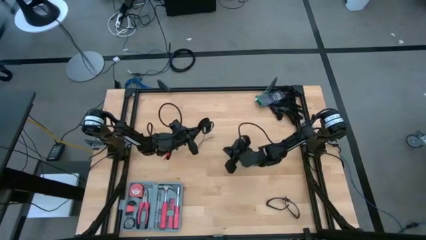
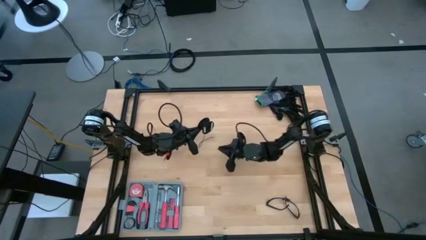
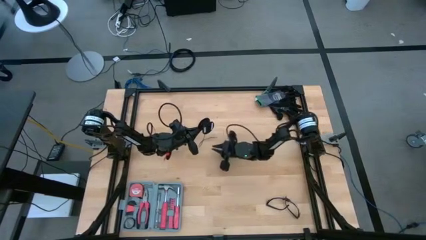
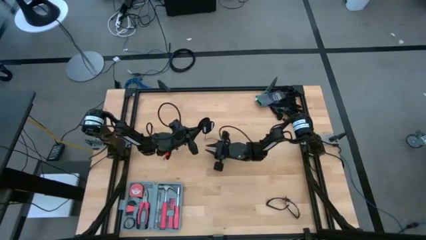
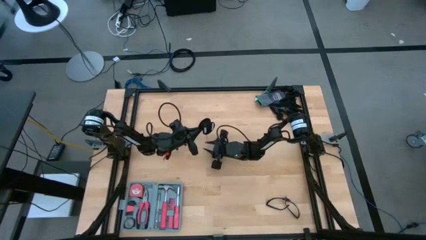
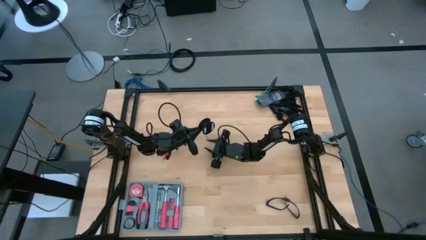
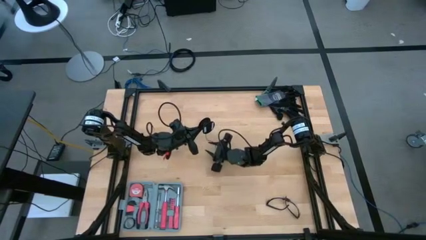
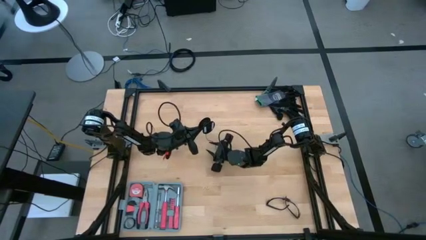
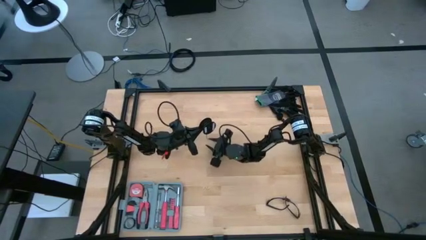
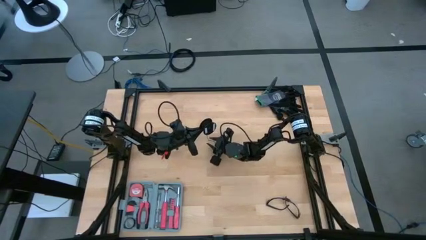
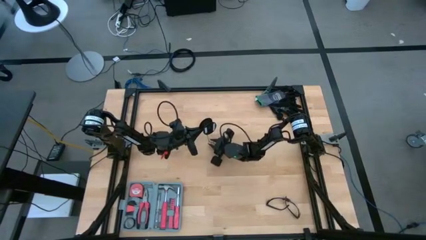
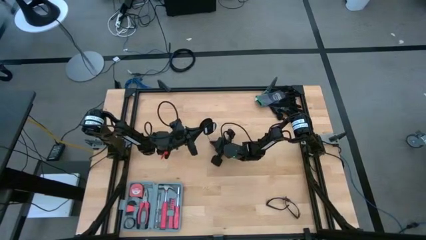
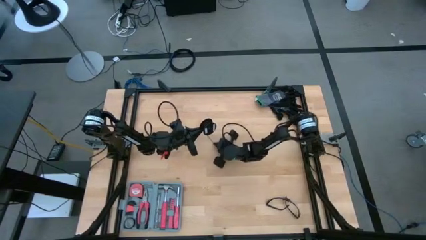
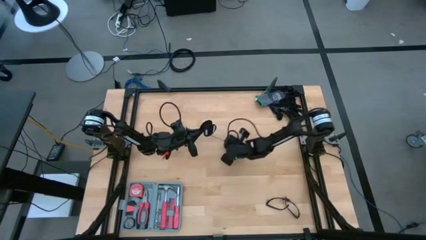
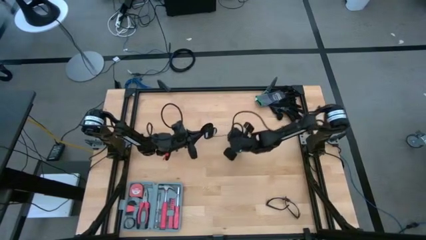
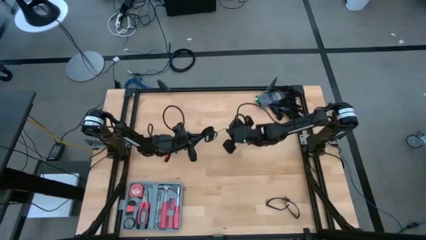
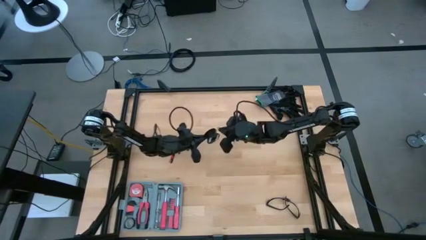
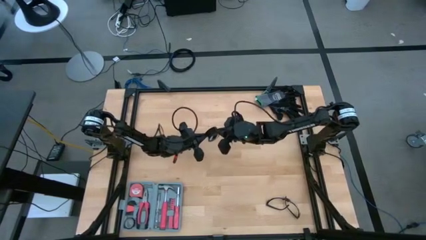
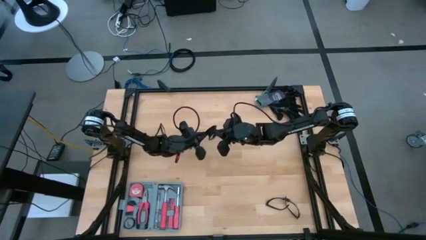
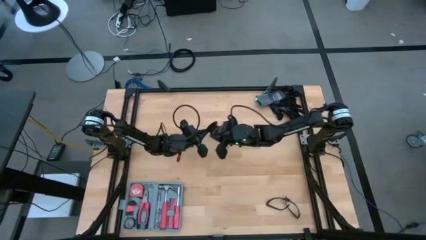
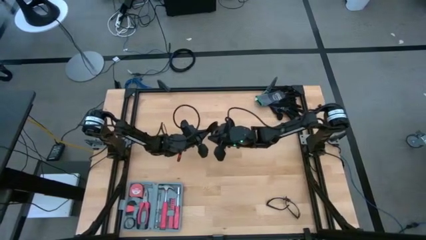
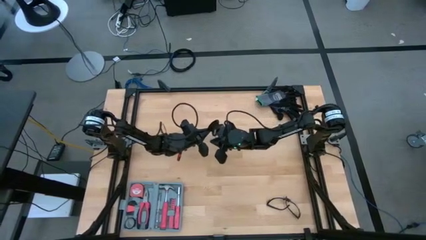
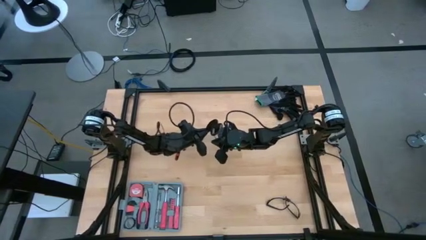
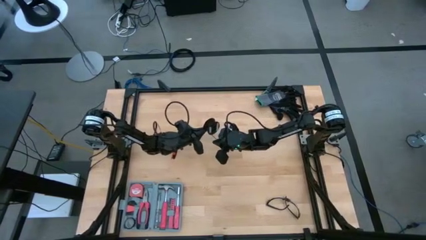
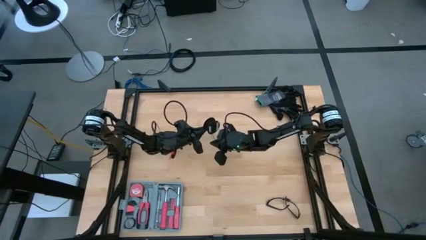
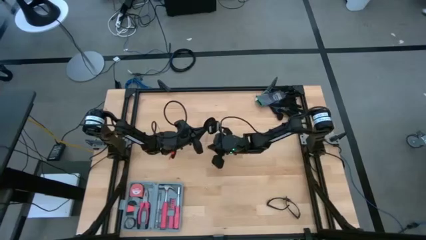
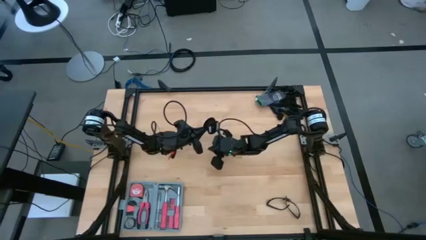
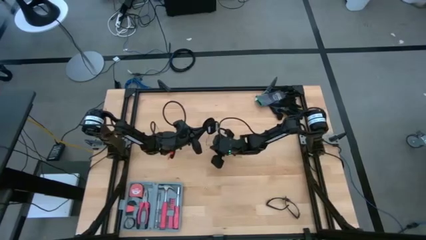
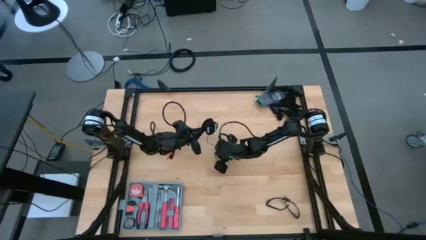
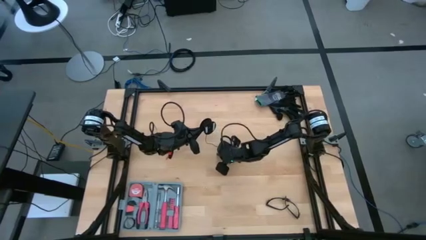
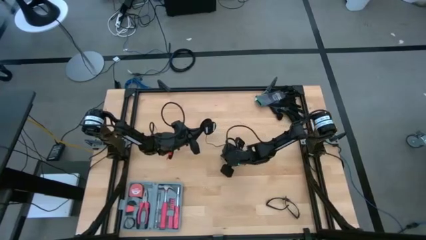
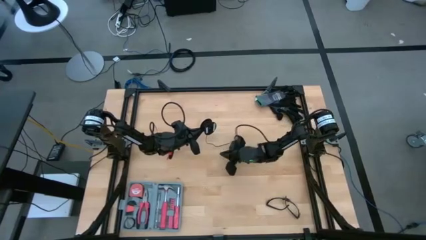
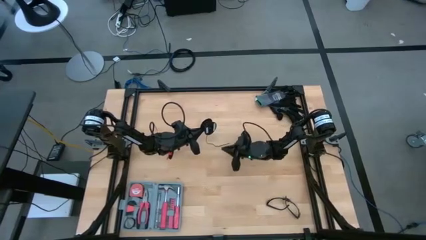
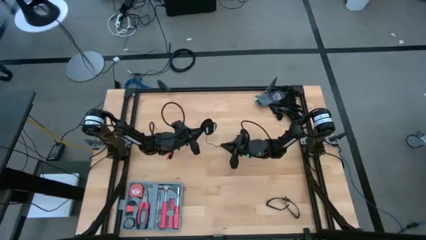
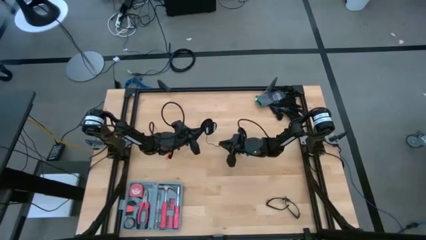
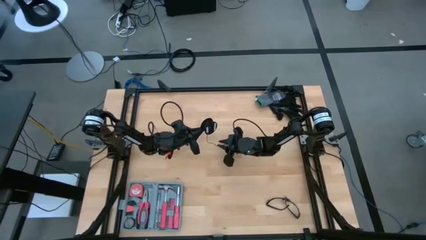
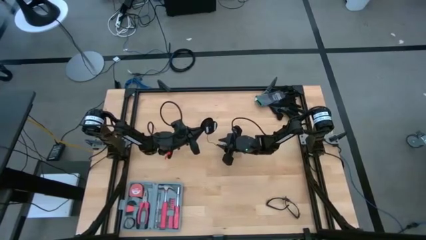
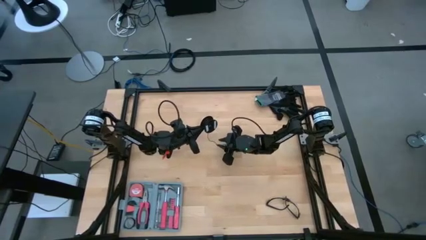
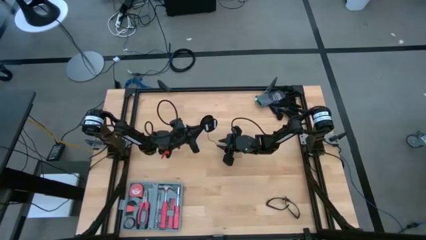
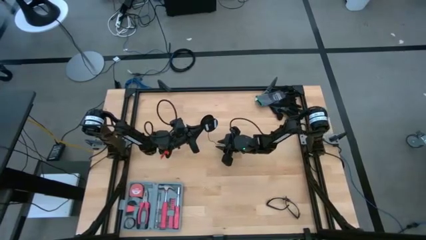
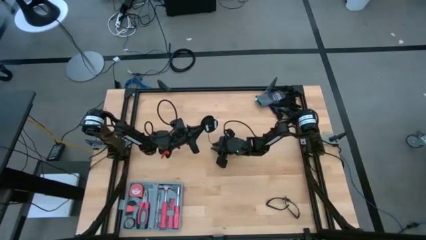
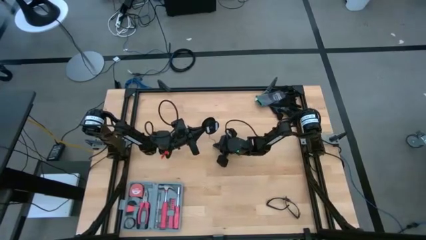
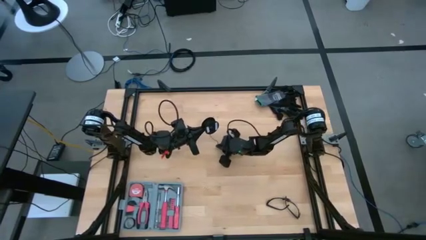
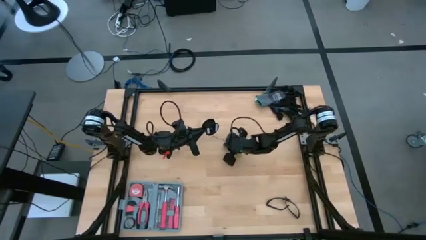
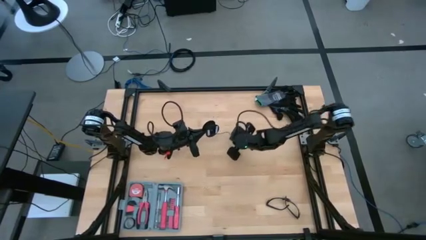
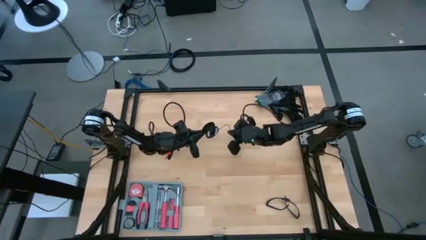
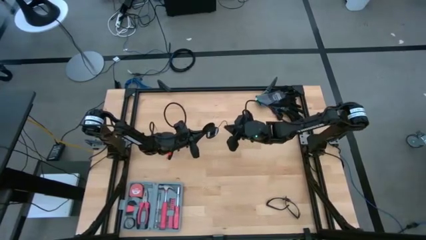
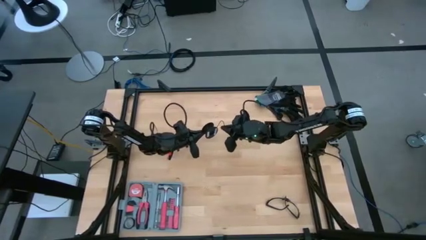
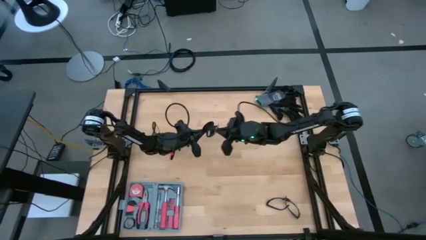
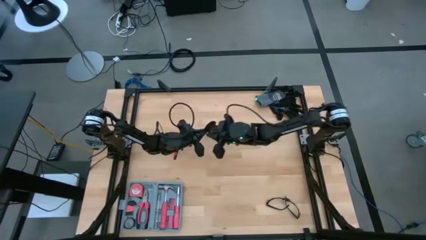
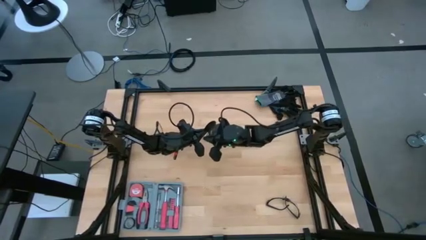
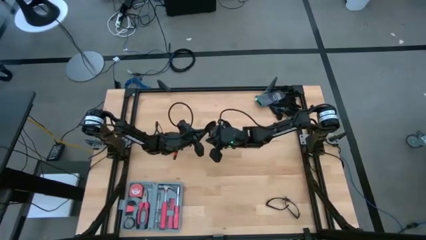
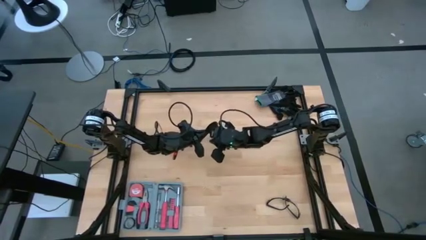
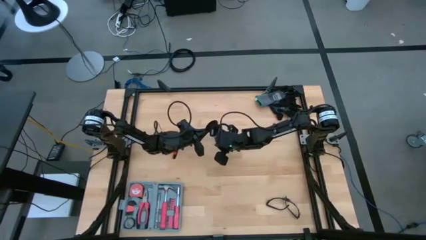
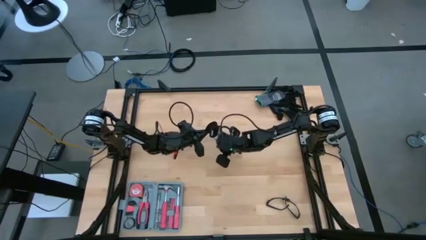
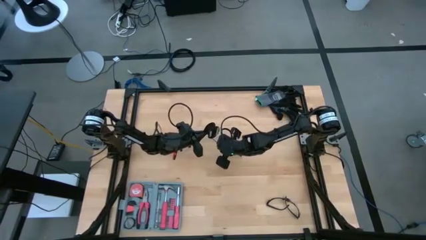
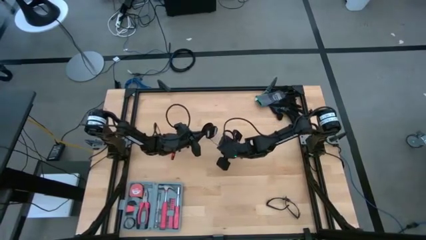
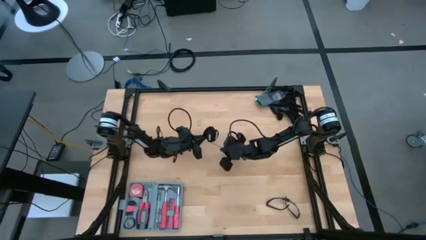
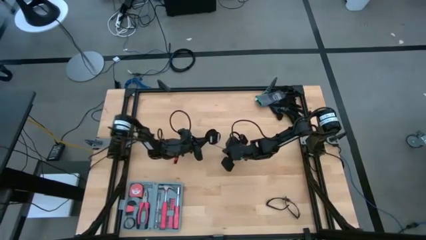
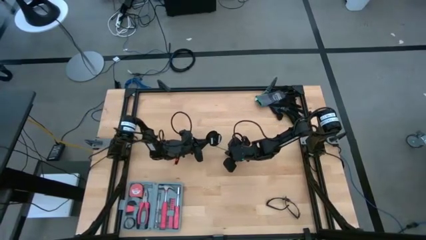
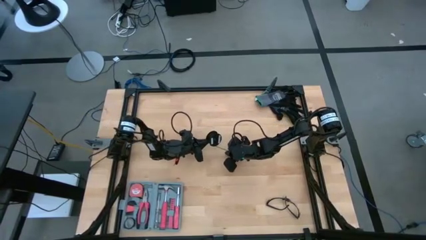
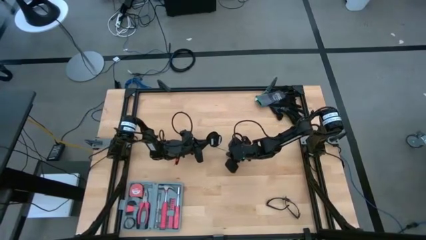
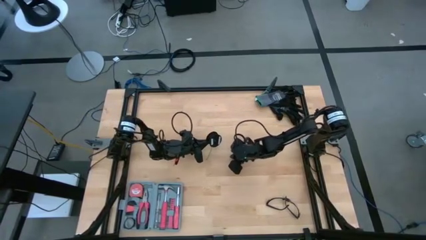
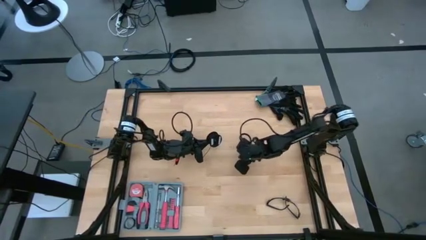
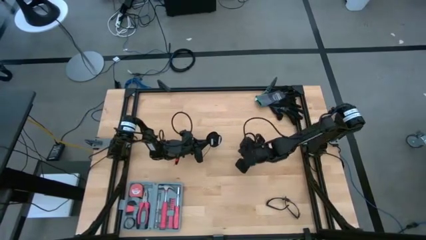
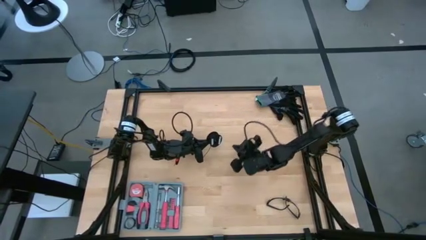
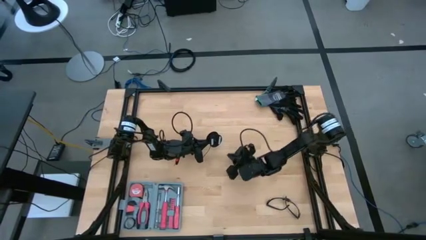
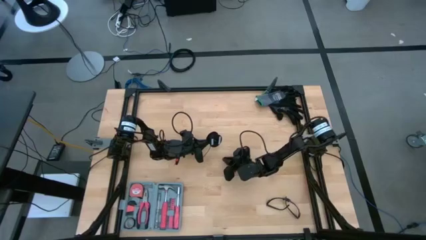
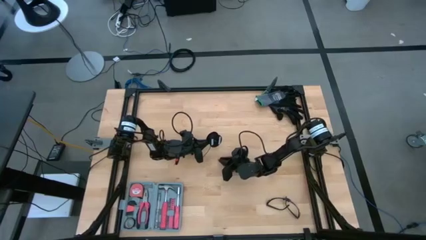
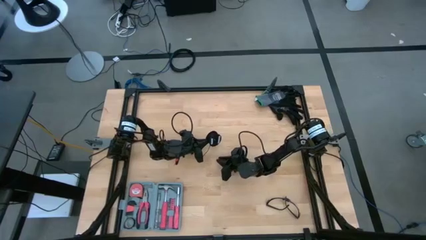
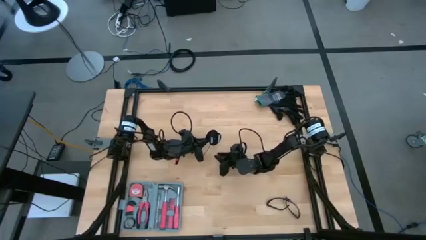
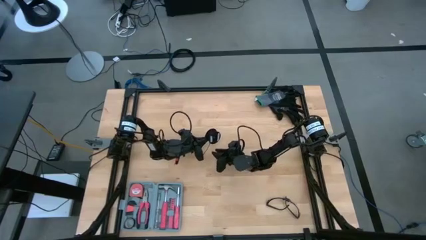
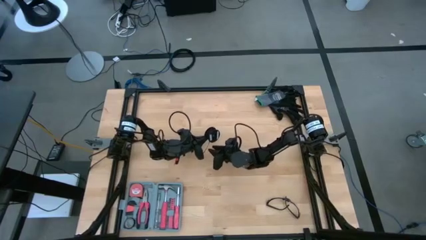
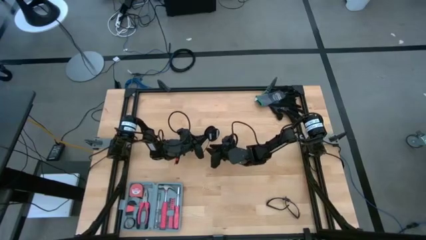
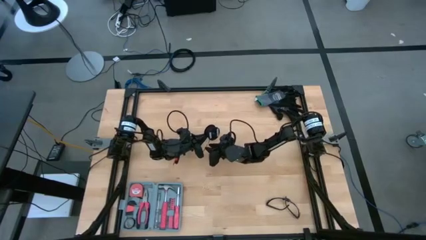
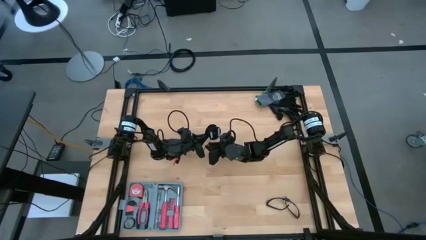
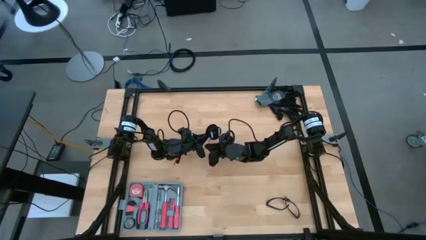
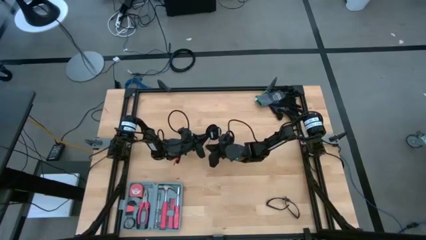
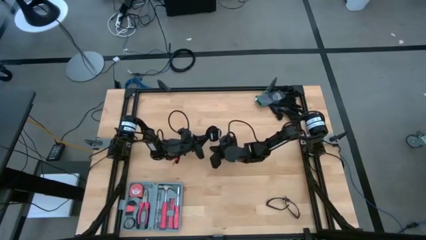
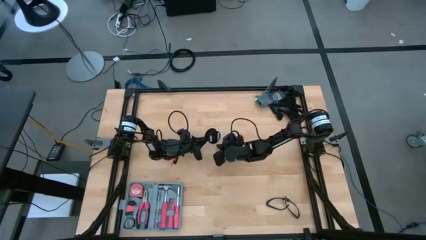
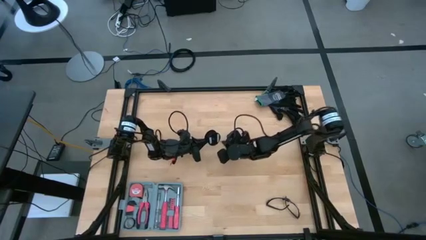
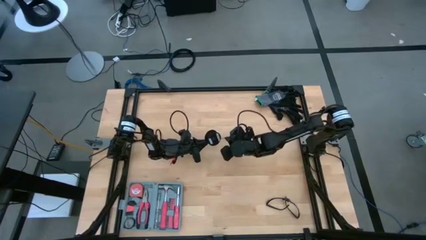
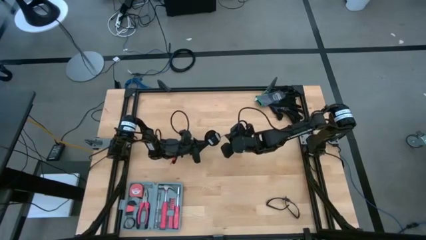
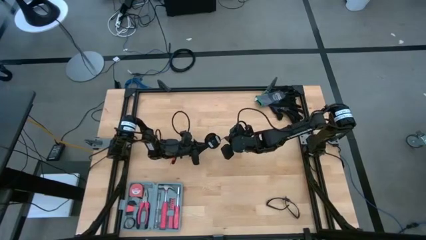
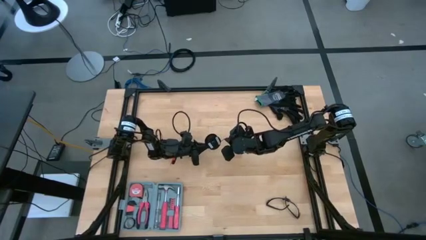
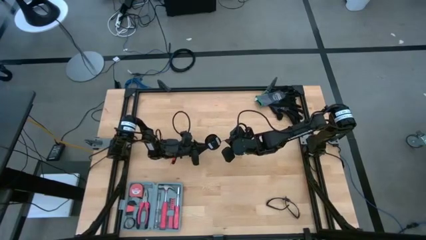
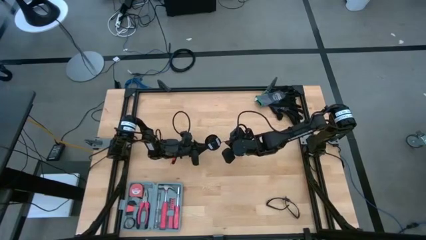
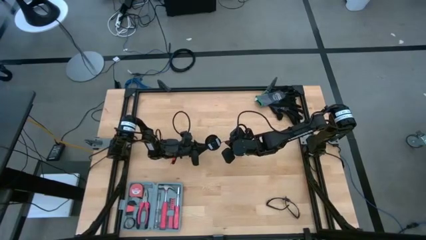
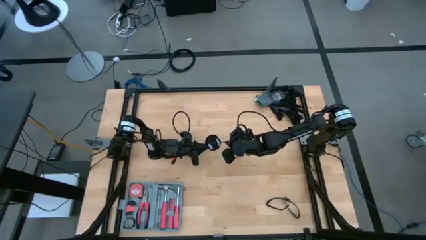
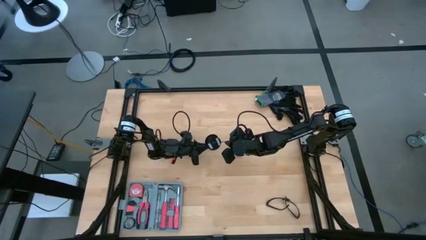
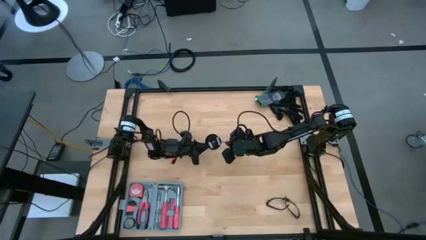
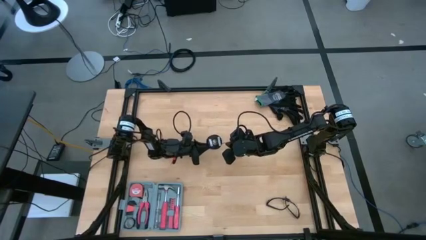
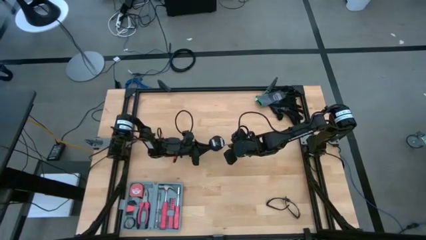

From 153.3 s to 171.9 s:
Task: Coil cords
Coil the black wire onto the spool
